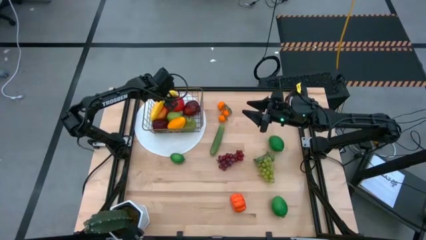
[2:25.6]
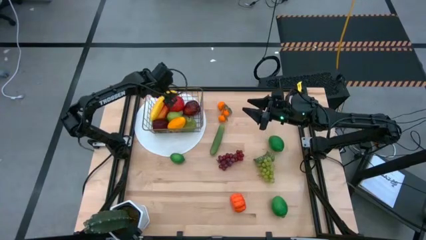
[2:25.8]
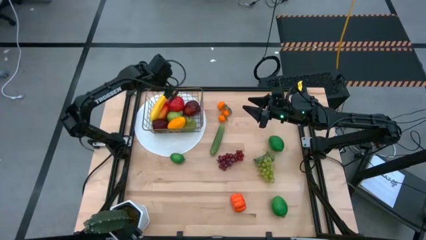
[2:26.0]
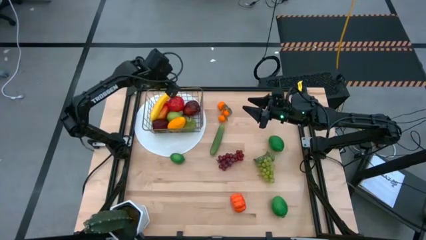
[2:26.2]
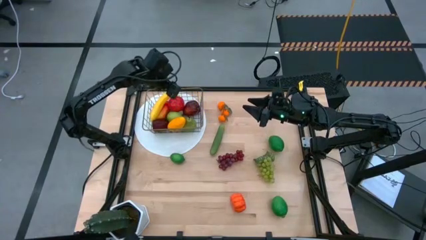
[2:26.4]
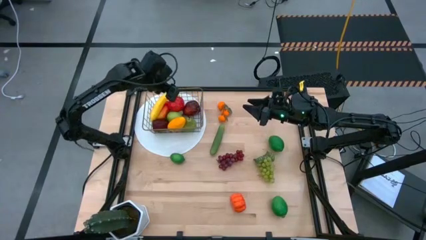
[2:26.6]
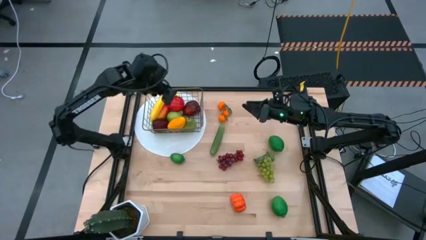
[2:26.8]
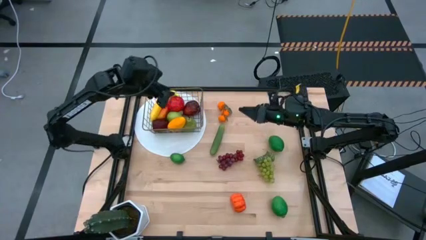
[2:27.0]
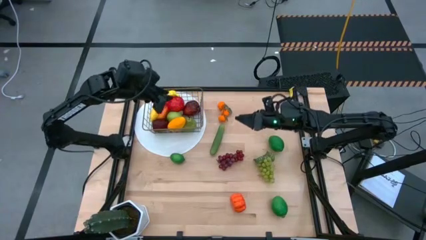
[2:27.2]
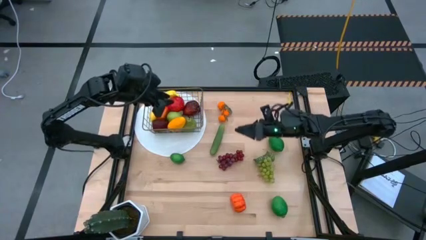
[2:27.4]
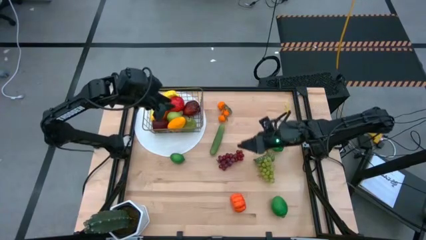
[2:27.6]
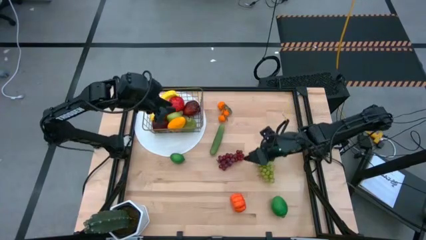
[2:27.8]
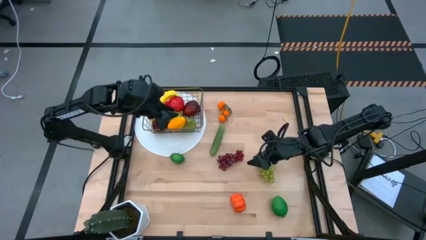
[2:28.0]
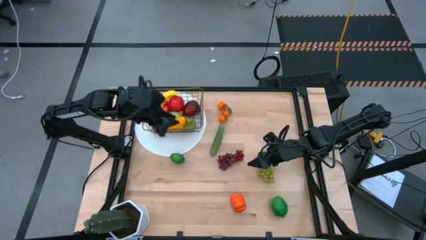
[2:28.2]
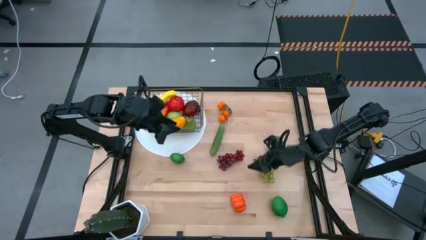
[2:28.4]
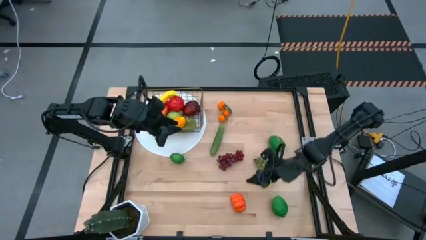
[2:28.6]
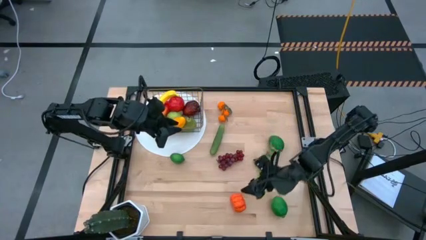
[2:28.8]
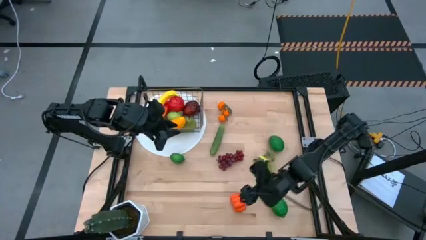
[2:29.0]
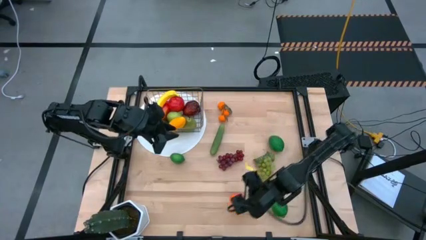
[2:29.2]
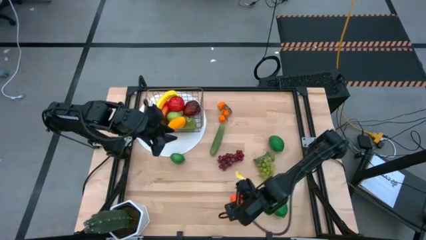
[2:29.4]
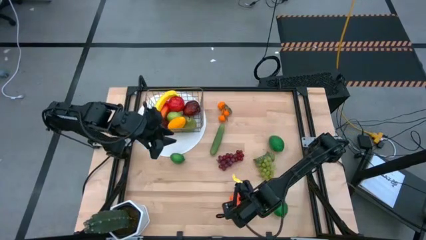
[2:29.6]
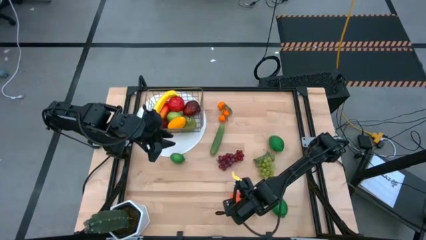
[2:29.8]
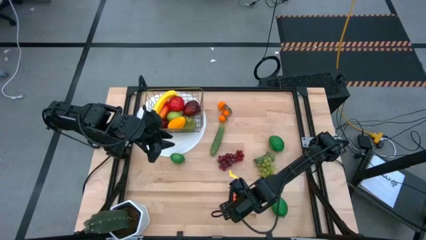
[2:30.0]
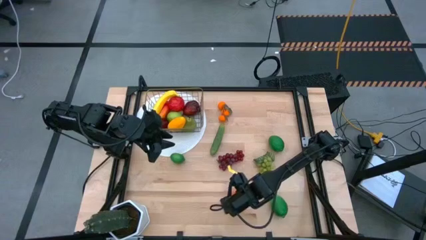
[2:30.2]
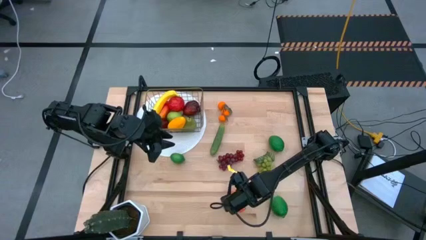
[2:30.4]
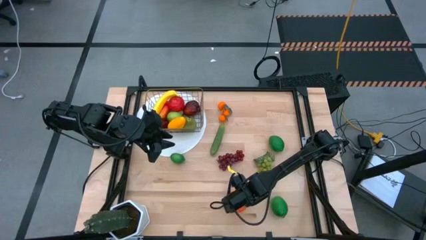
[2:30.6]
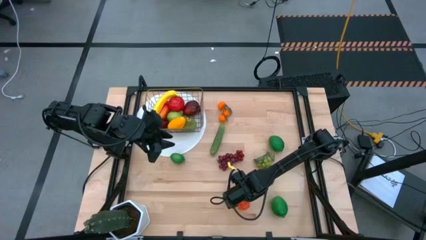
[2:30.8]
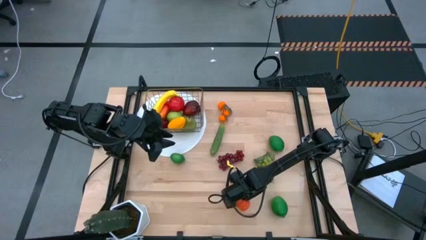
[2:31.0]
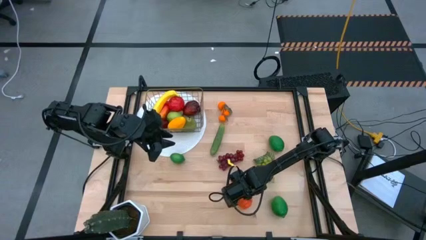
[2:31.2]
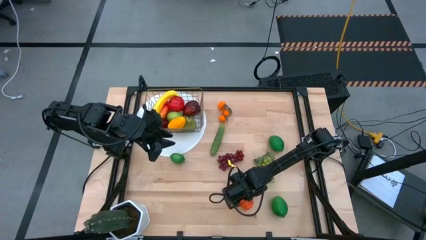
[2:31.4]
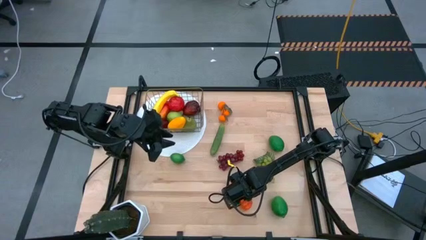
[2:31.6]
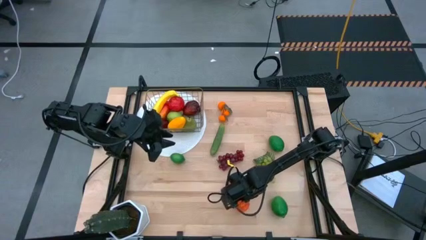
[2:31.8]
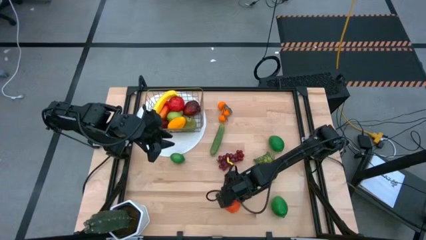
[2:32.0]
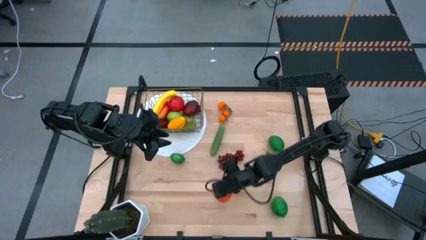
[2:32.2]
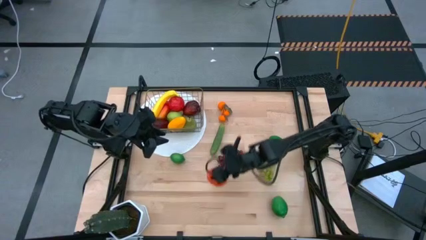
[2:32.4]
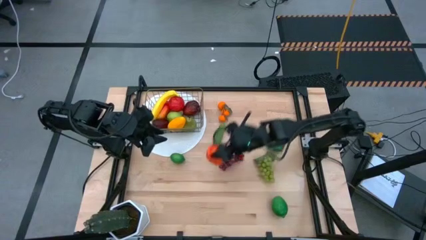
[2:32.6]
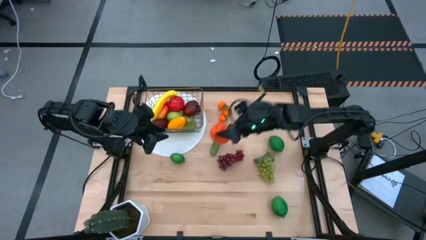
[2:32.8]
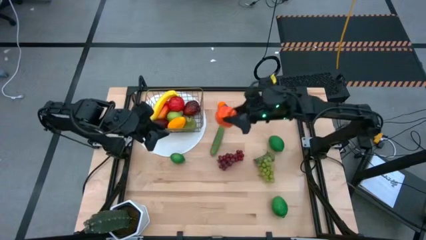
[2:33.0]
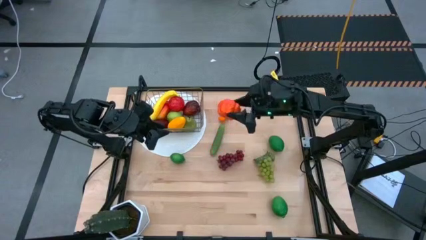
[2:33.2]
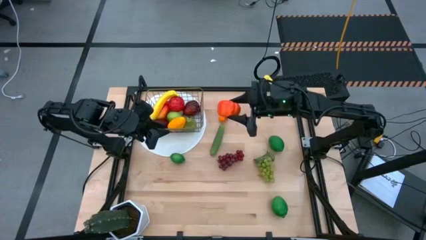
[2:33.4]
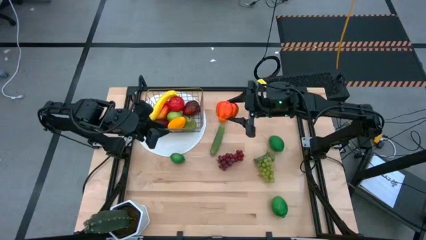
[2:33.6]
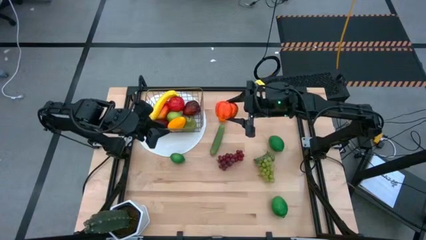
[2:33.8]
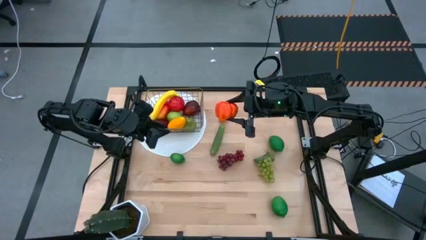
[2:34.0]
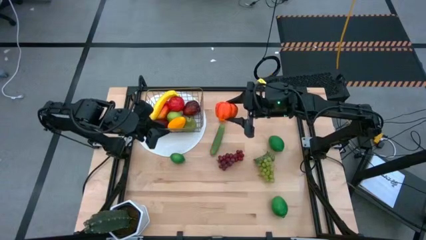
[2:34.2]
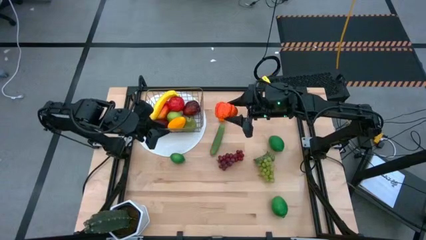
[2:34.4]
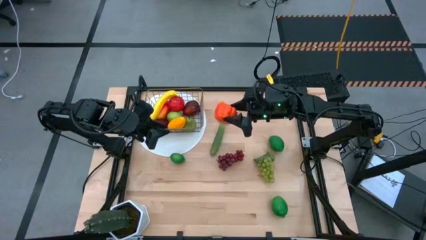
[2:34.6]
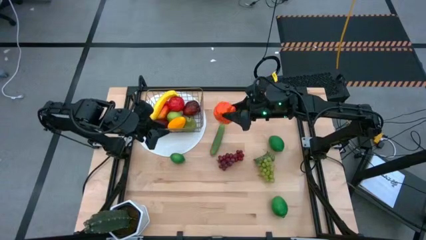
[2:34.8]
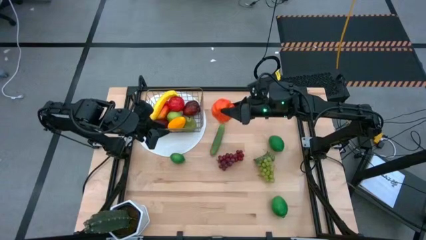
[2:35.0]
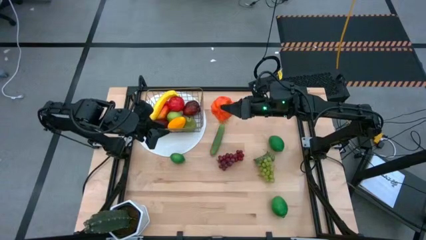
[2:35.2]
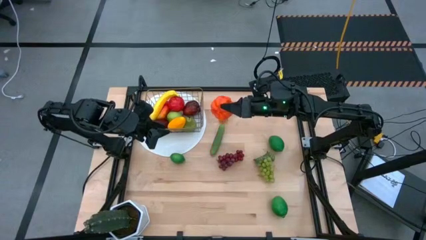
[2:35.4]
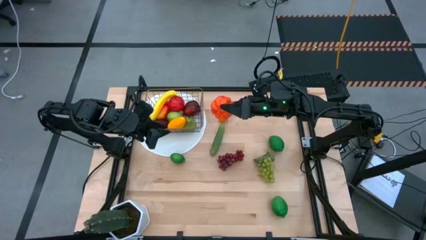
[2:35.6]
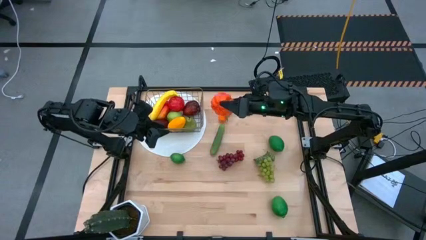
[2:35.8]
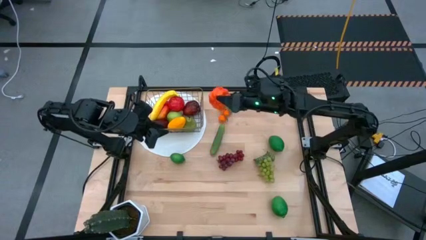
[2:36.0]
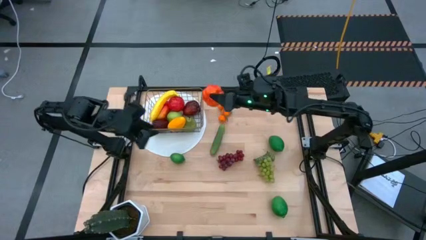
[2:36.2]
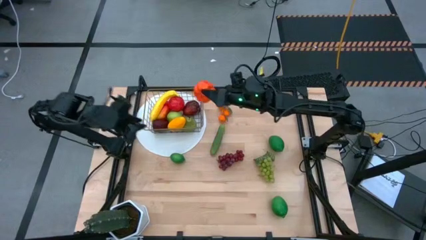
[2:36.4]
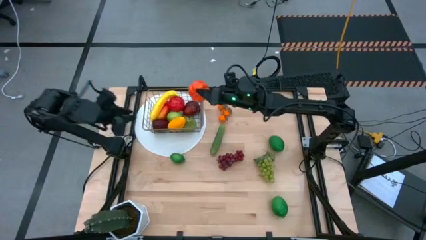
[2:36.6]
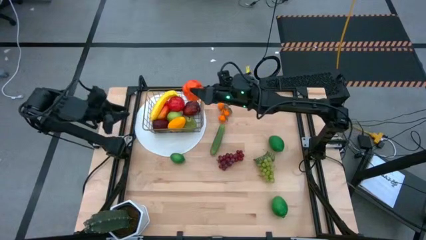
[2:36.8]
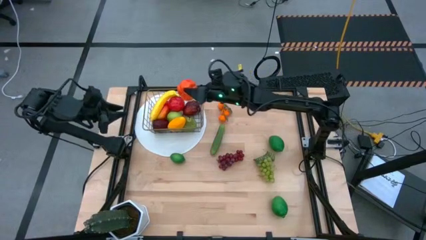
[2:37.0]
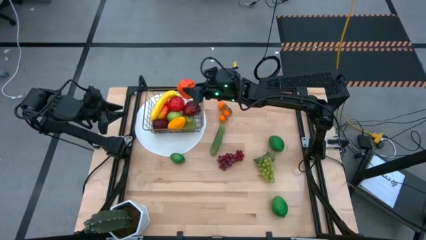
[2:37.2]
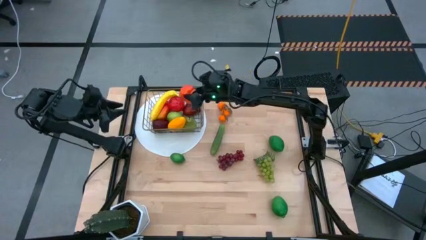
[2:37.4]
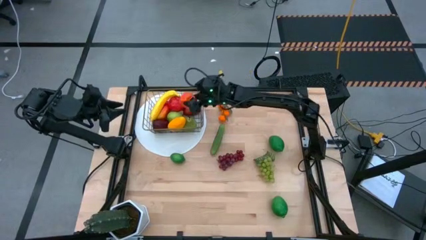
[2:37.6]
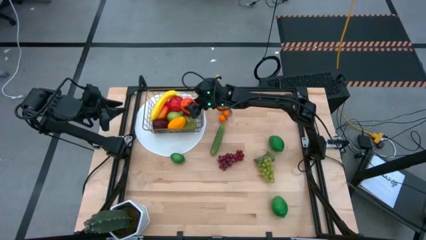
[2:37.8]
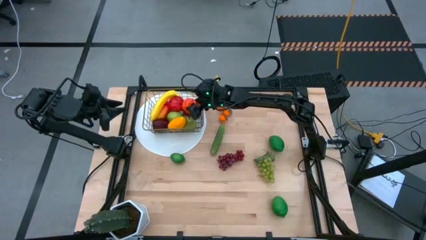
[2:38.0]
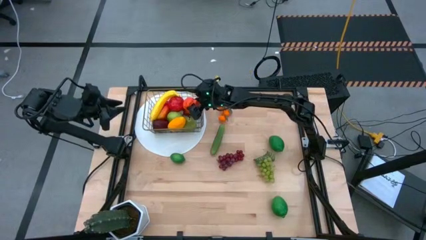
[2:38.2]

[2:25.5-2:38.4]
Task: Build produce basket
Put the pumpkin into the wired basket

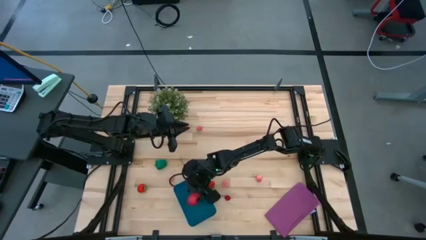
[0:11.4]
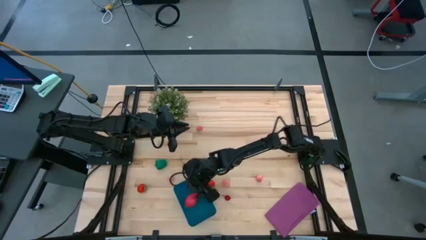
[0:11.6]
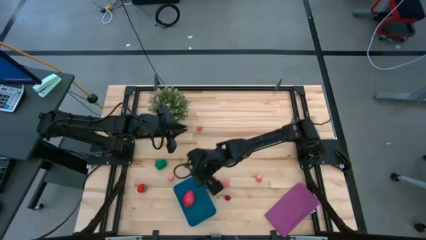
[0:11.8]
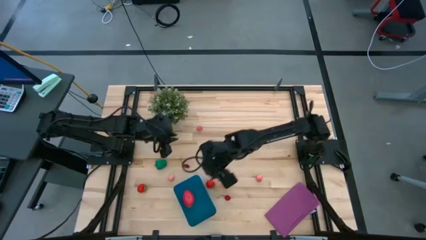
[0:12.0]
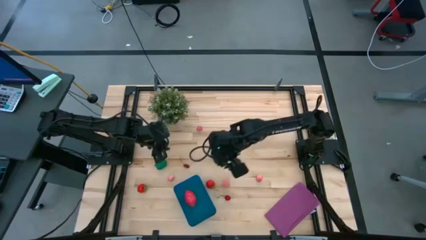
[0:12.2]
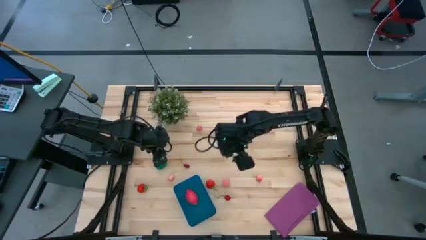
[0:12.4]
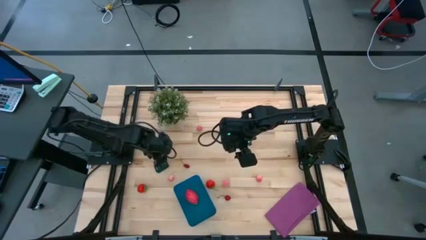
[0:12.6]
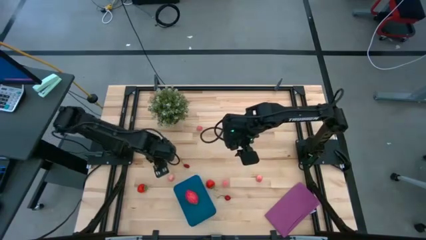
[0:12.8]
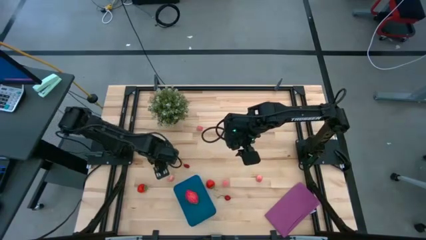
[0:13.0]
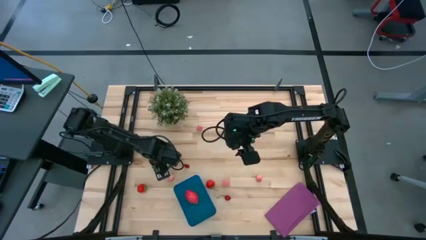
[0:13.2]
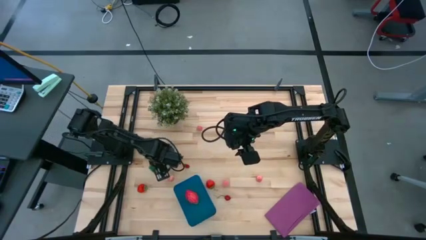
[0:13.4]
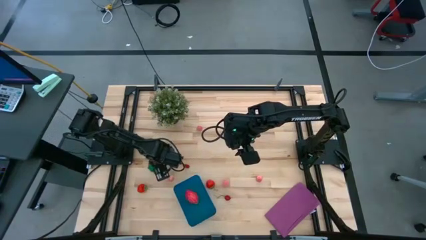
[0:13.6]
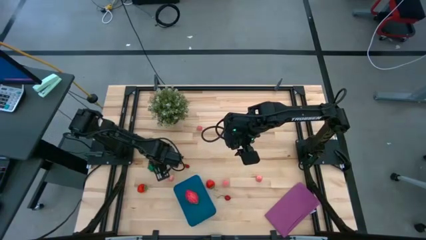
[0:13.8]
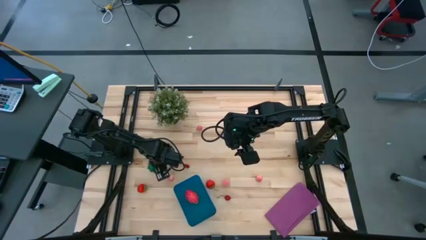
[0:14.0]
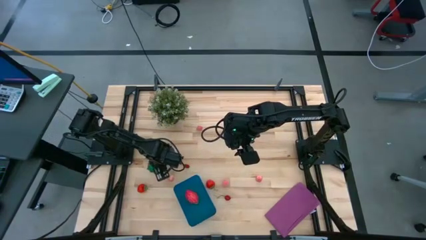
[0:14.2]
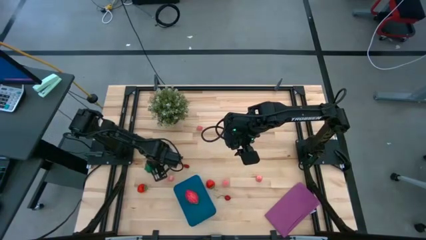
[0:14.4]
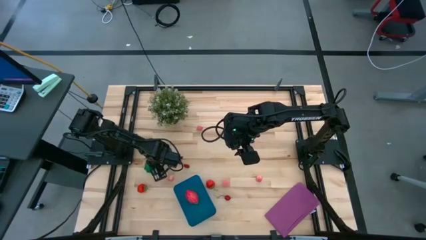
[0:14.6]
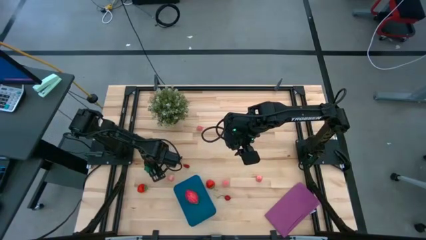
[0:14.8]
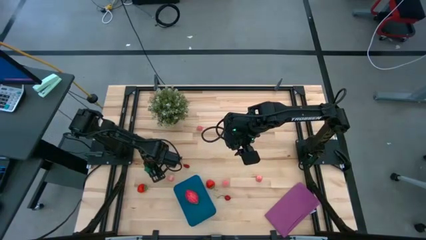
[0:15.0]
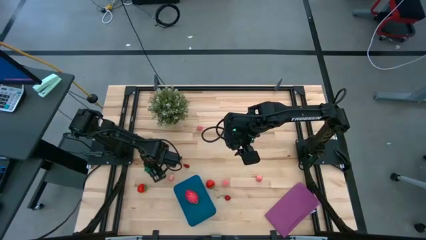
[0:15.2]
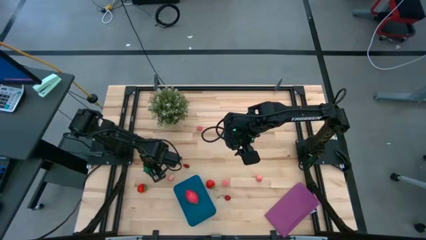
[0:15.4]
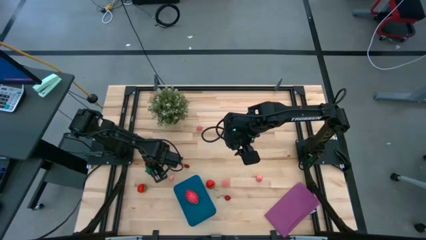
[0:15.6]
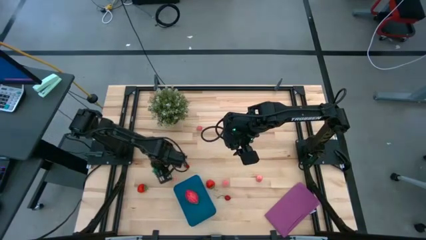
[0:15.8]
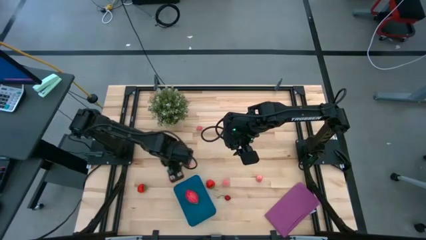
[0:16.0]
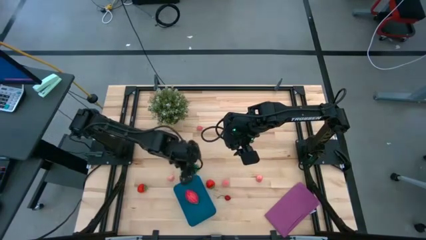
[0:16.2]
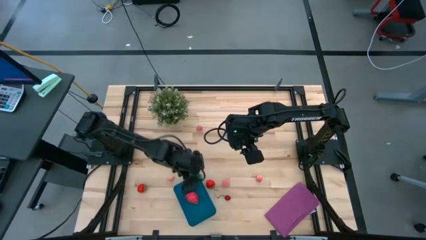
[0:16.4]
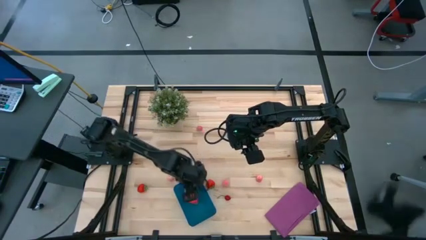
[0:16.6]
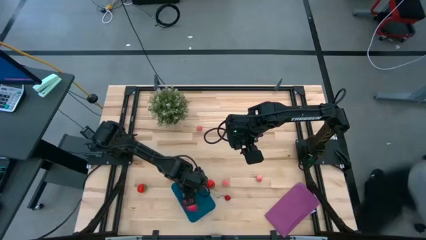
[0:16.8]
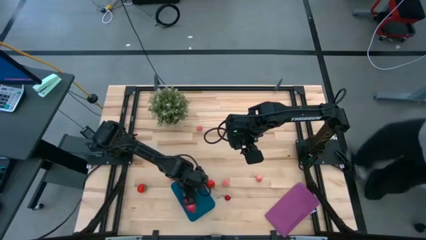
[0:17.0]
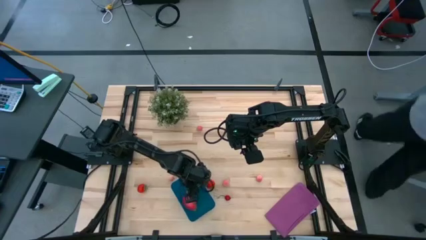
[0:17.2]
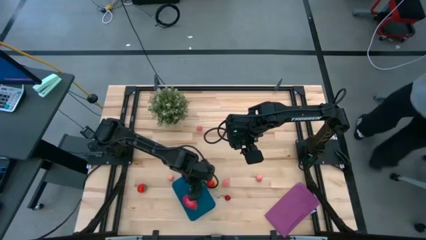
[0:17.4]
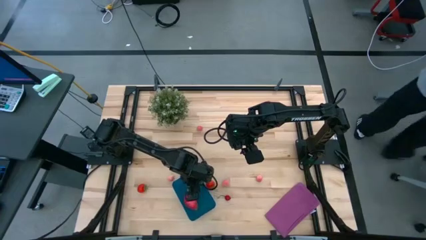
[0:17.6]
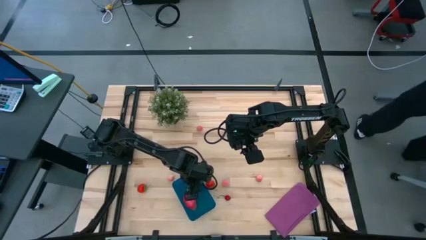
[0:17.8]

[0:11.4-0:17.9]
Task: Pick and placing Produce into tupperware
Put the green bell pepper into the blue bin
